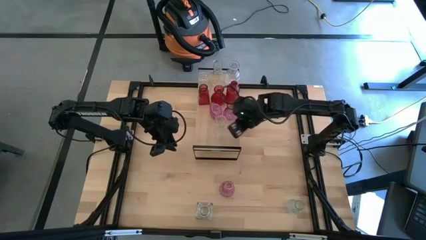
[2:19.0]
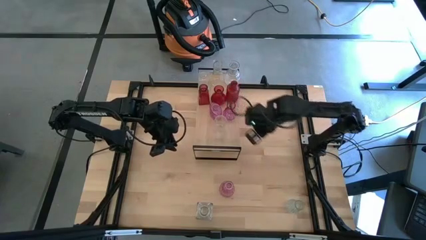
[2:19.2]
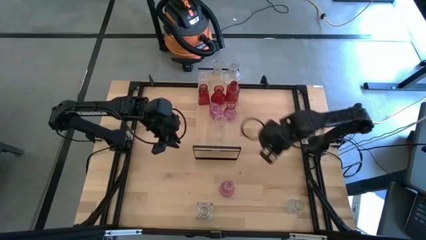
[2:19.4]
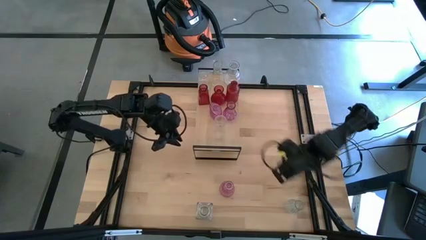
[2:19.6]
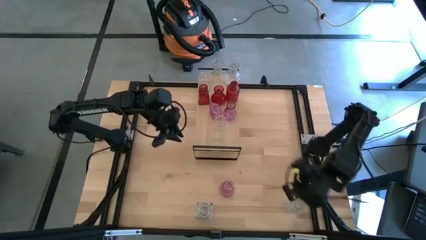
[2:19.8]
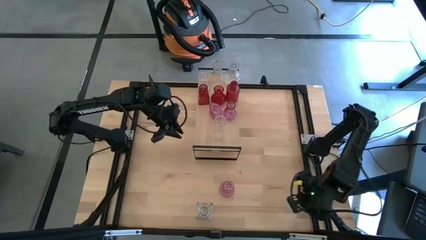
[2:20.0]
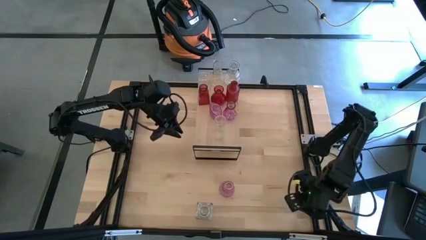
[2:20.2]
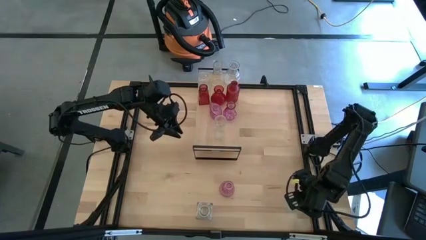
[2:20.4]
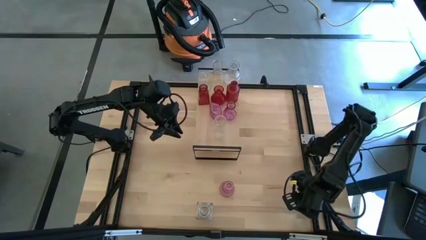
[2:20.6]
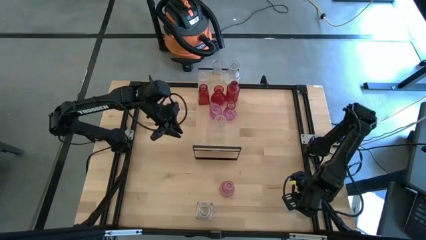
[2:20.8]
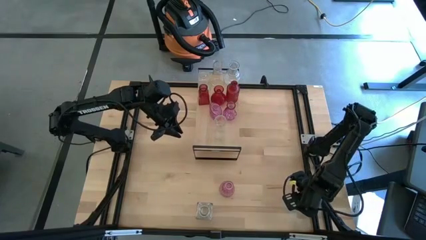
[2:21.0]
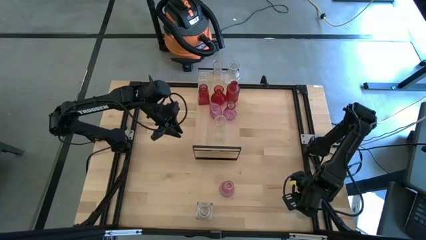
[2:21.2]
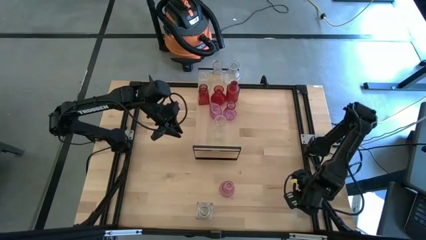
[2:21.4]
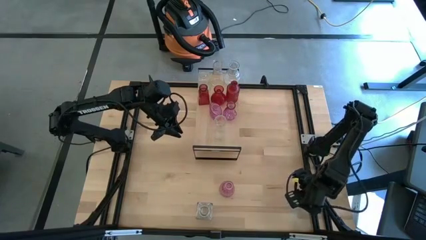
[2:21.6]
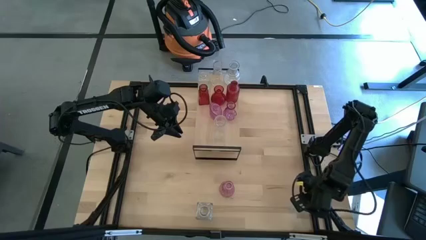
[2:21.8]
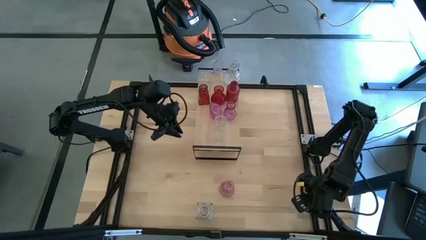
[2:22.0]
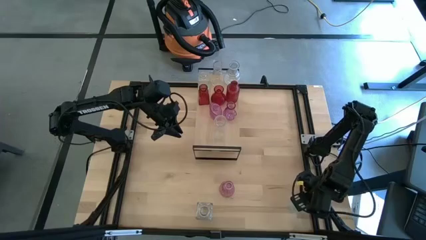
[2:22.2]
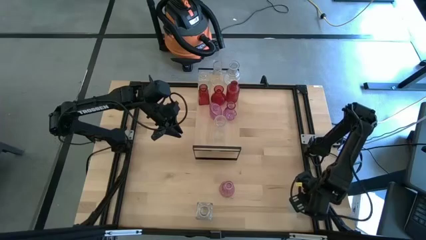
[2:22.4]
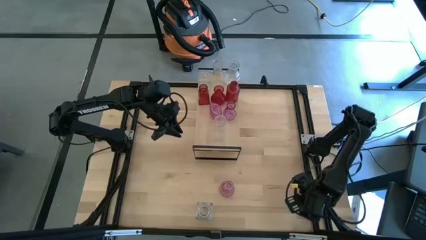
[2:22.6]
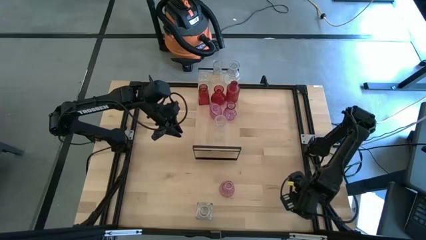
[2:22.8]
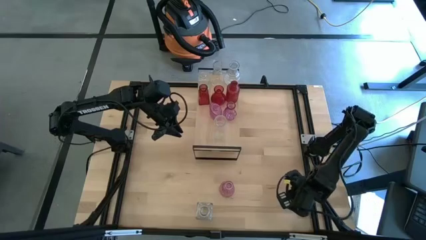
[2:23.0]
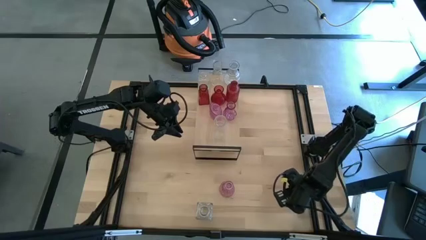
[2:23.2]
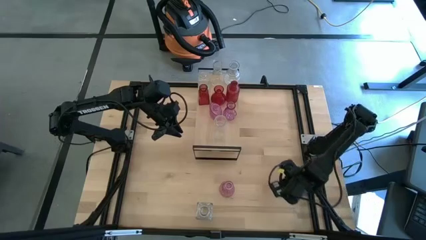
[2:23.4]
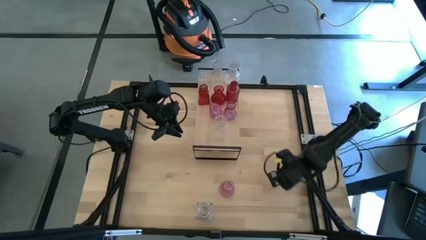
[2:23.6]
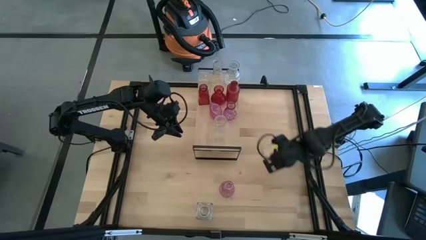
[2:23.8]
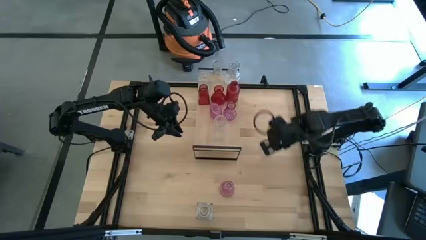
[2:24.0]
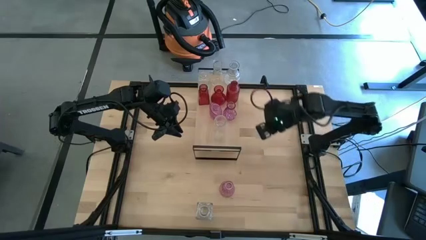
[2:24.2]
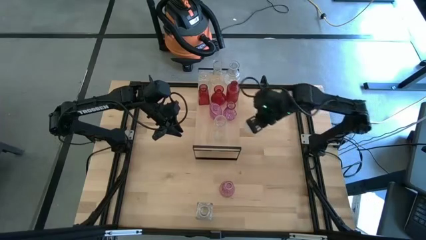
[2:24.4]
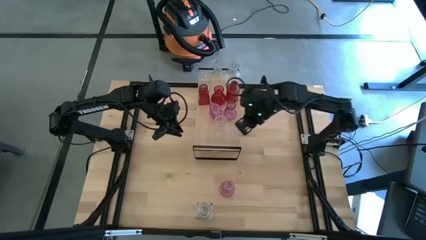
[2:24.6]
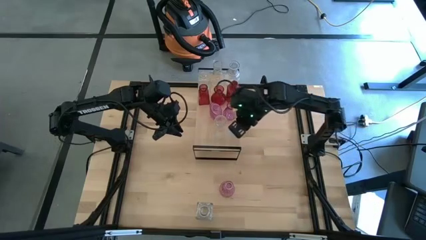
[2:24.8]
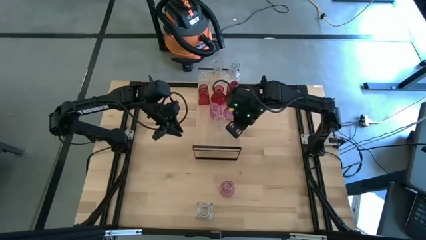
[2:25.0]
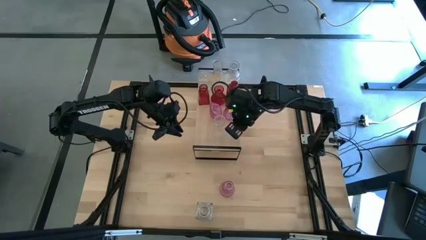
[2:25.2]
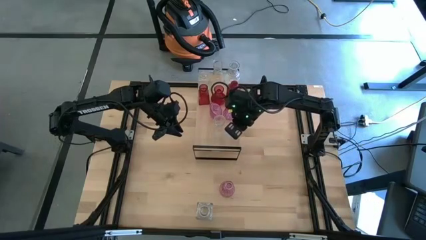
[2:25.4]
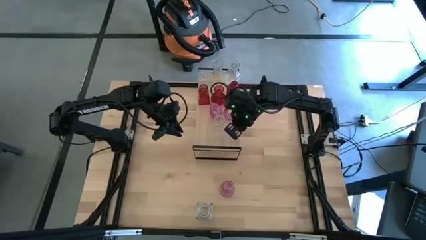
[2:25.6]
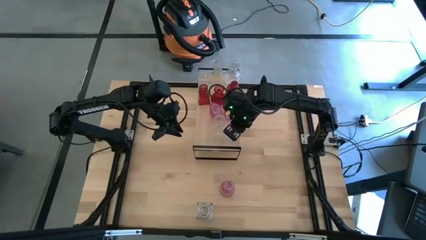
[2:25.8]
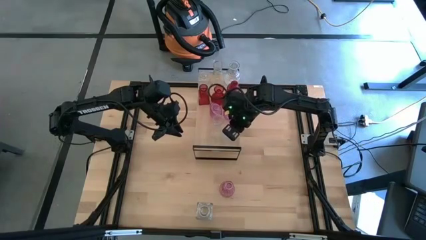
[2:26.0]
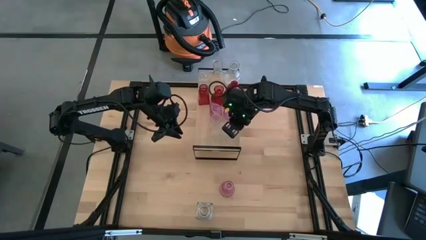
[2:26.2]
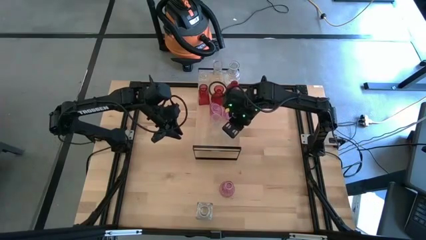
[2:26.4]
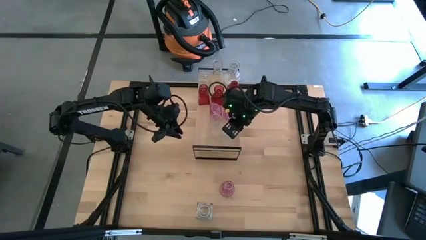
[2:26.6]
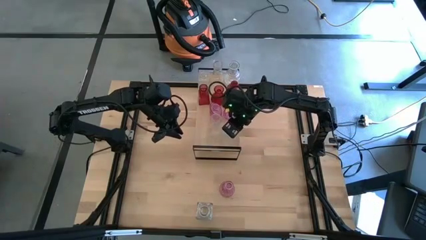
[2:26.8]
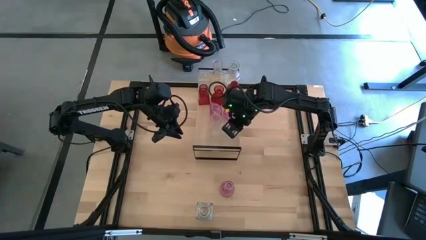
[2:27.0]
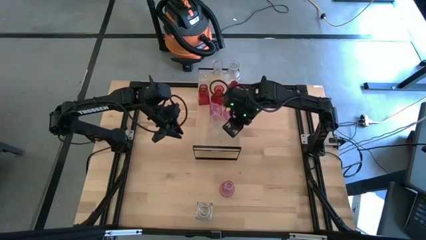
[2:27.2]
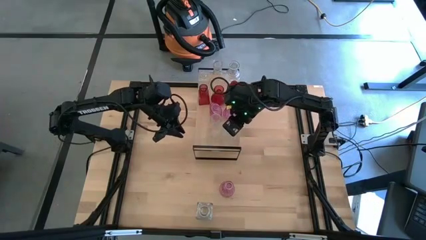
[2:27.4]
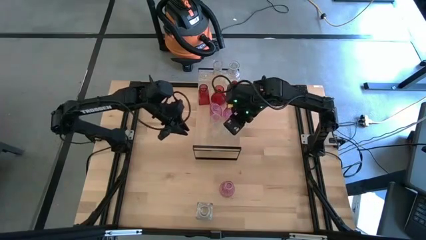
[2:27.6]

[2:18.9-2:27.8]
Task: sort vases onto shelf
Put the transparent vase on the shelf aligned with the other transparent vase

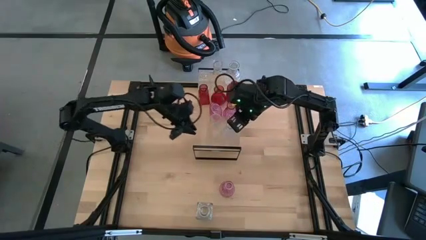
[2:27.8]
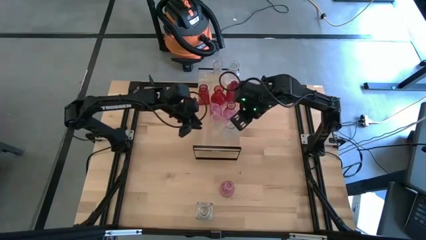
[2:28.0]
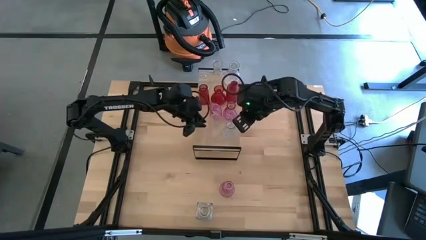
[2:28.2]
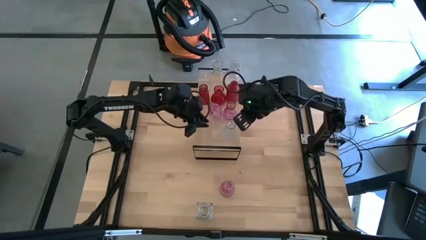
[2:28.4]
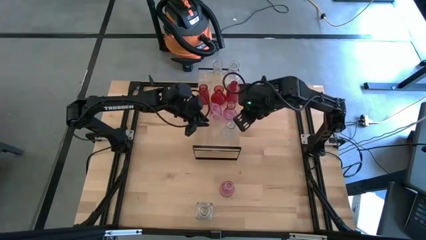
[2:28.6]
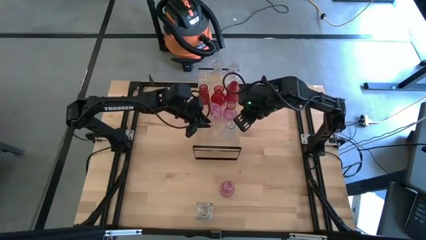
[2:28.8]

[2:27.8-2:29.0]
Adjust the transparent vase

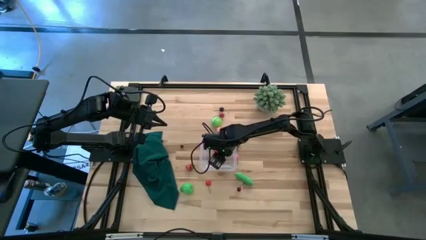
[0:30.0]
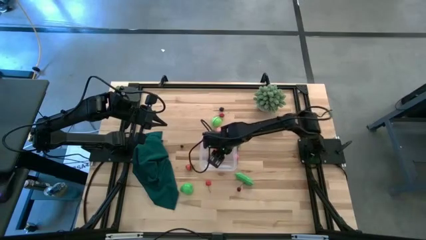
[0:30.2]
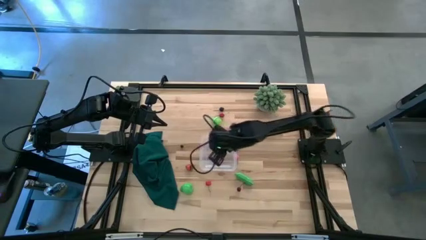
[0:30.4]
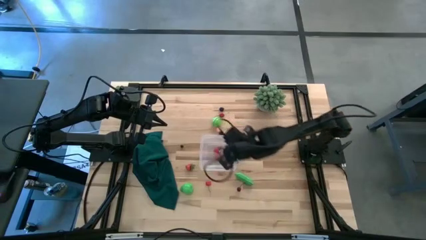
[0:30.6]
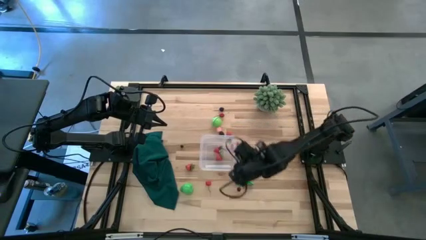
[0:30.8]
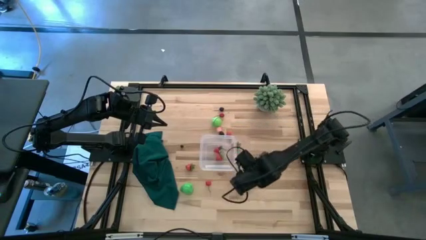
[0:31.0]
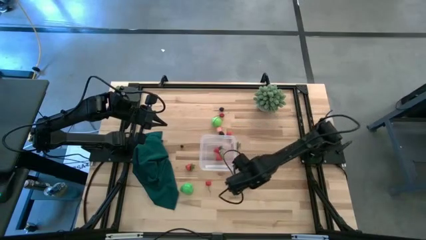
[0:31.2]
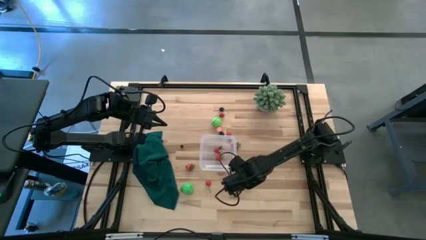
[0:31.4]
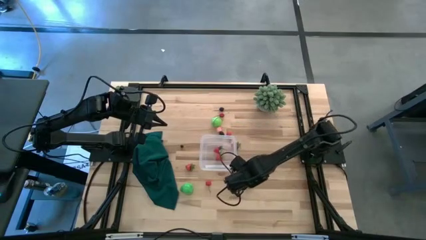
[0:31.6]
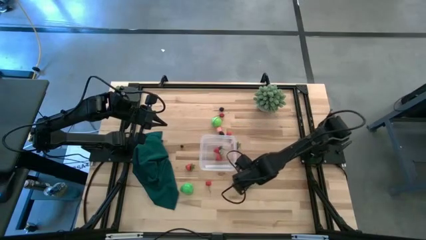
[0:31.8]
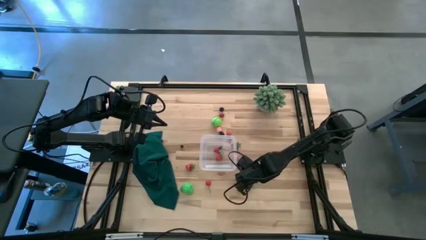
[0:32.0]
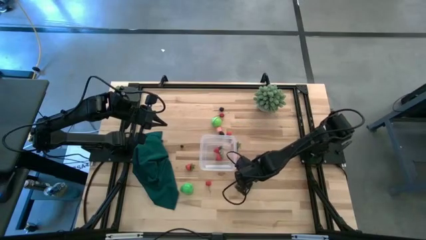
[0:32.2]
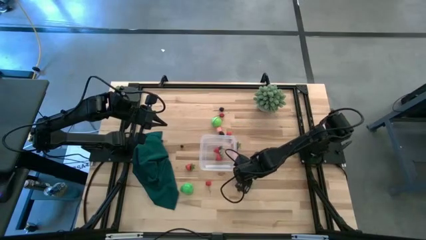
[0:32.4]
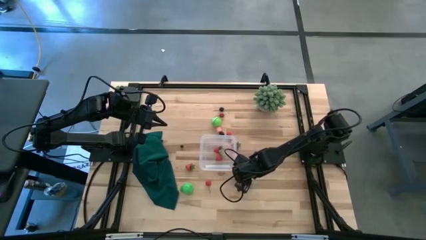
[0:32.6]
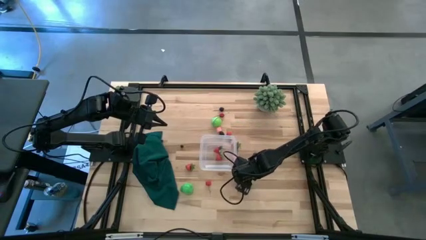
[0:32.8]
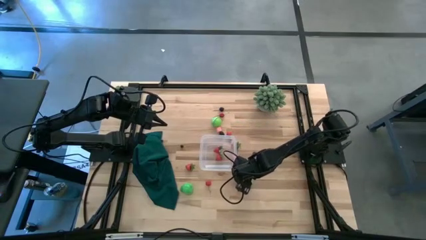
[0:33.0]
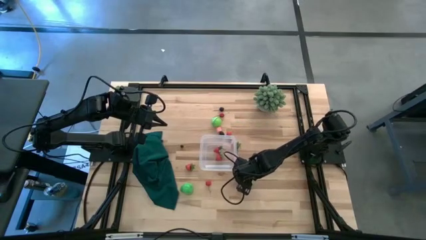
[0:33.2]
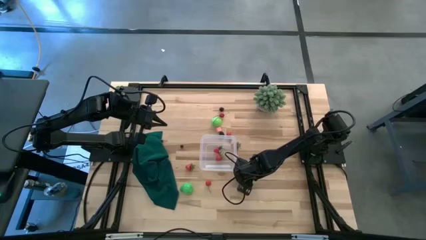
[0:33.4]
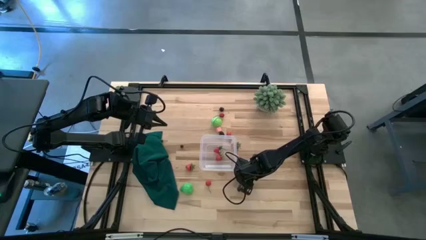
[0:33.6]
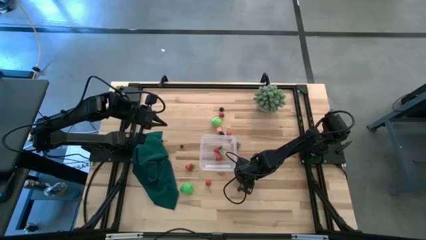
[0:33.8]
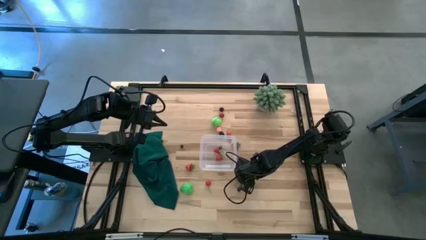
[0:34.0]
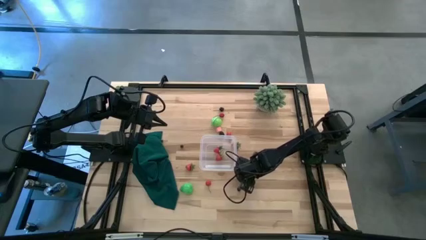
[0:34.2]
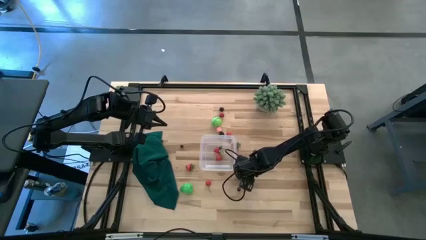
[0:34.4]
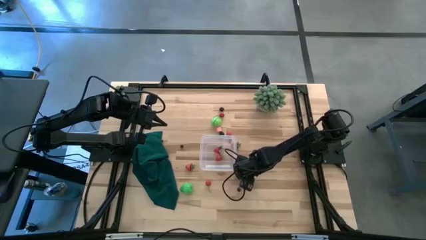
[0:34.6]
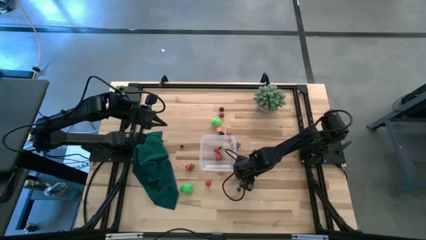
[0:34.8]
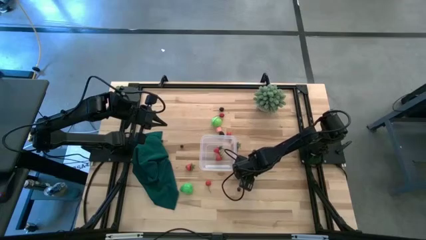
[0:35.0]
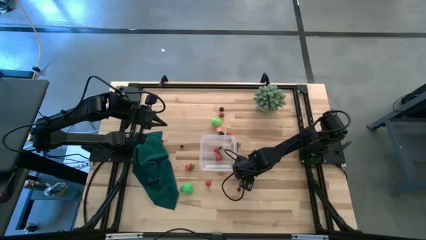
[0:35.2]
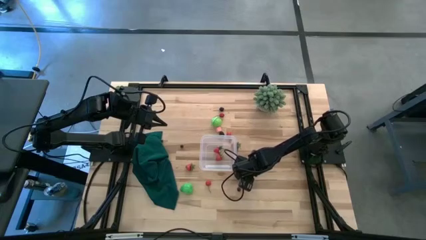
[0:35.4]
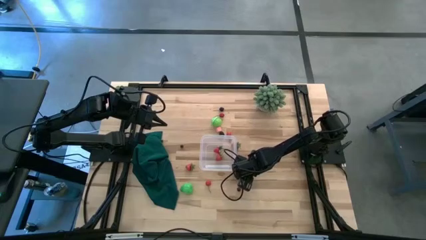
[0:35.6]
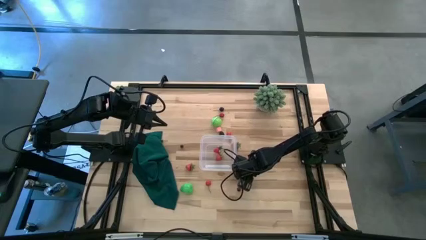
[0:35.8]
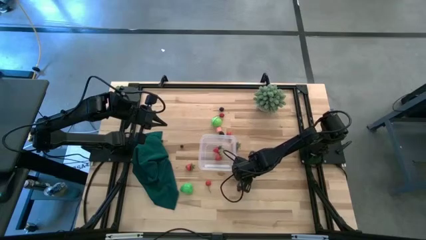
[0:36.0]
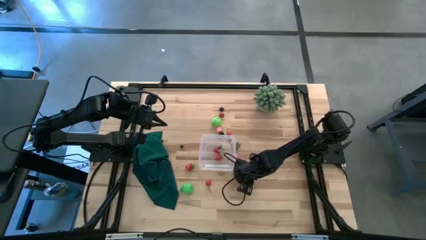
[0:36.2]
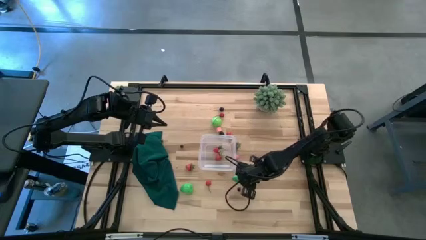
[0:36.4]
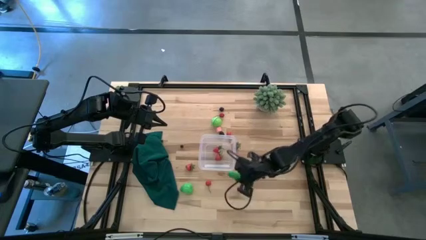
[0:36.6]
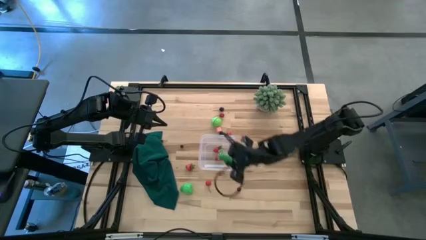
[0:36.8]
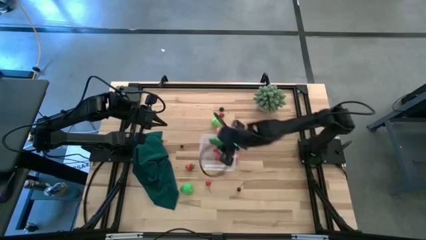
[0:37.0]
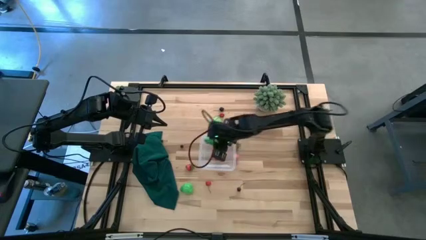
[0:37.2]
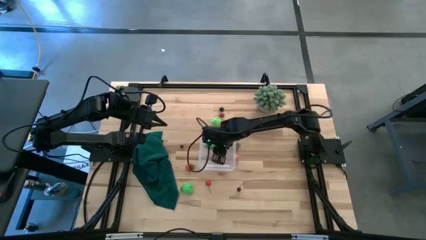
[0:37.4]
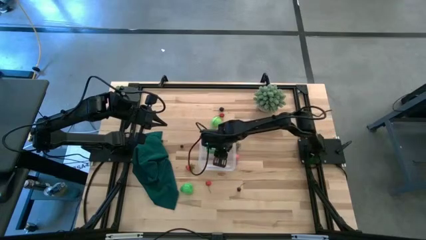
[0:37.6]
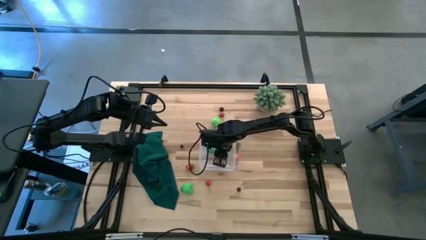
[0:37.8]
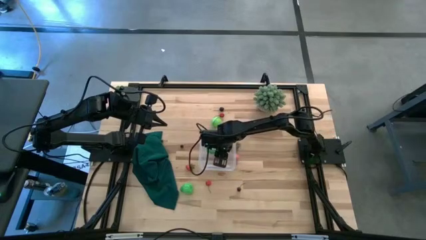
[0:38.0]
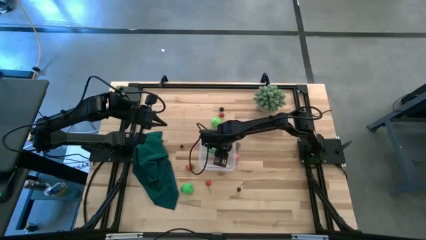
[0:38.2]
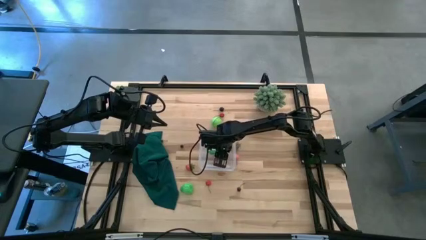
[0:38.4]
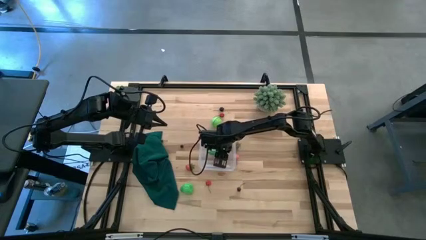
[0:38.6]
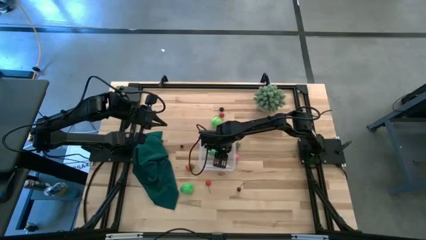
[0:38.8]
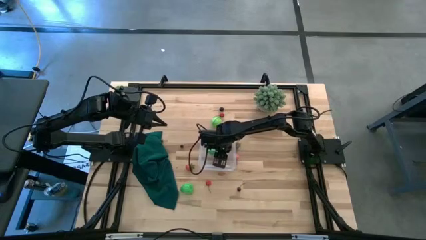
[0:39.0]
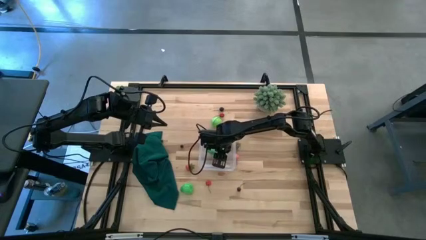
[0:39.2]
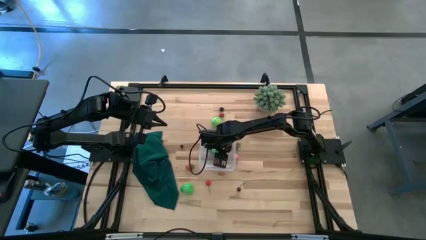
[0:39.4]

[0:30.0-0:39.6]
Task: Pick and placing Produce into tupperware
Put the green pea into the transparent bin
